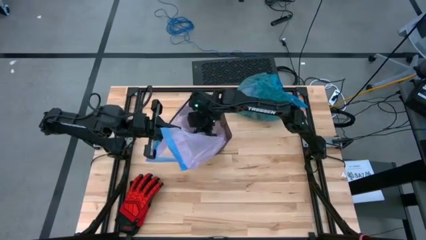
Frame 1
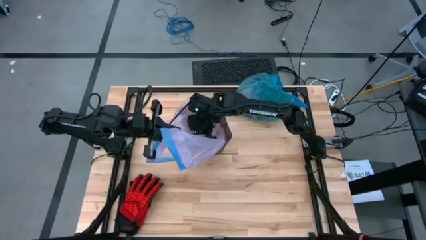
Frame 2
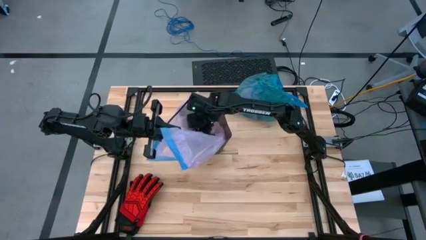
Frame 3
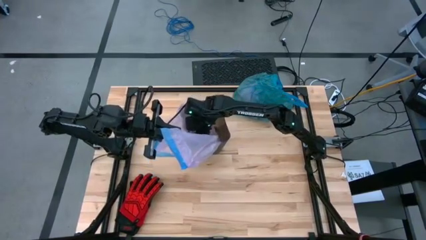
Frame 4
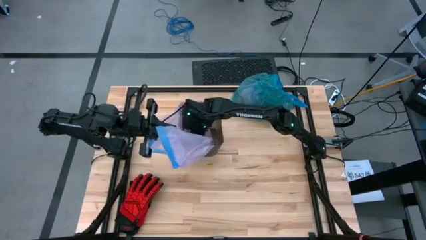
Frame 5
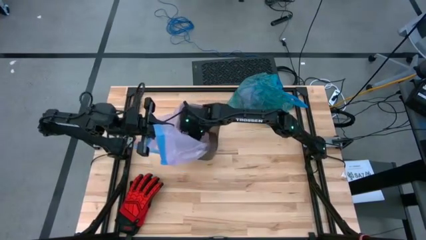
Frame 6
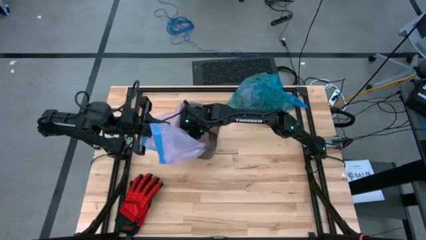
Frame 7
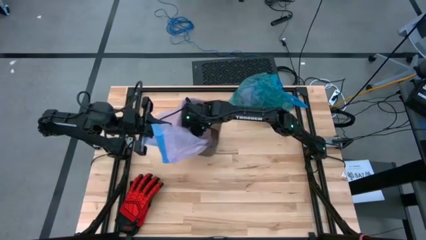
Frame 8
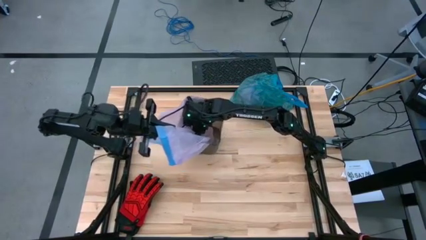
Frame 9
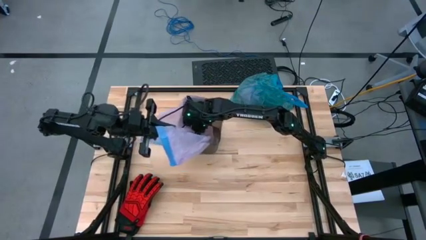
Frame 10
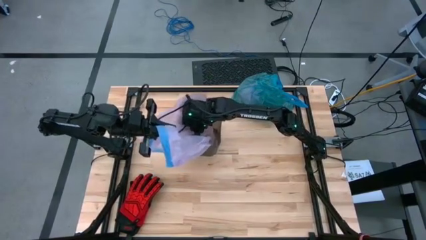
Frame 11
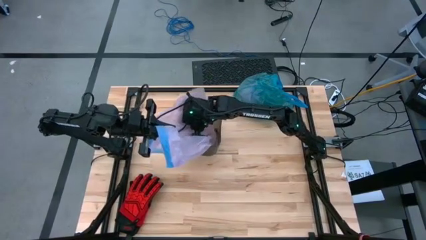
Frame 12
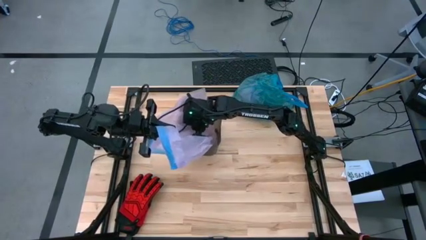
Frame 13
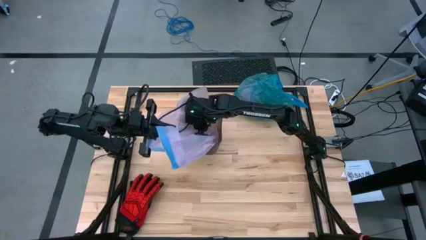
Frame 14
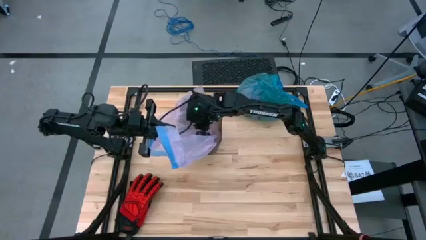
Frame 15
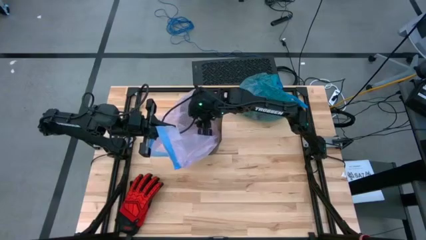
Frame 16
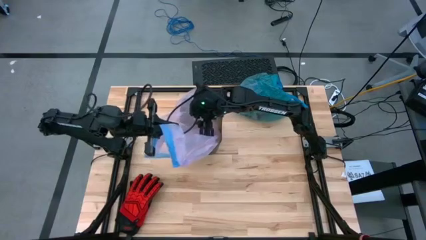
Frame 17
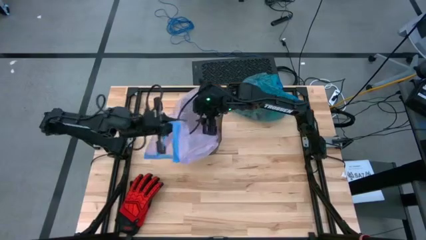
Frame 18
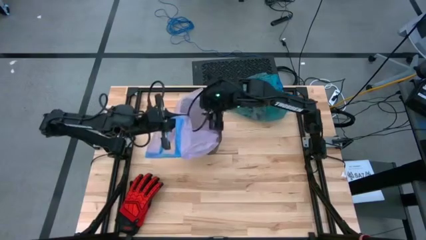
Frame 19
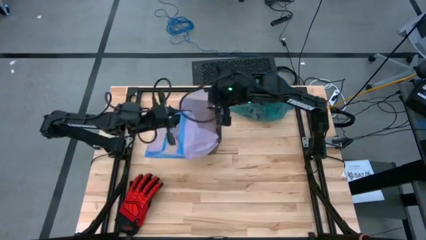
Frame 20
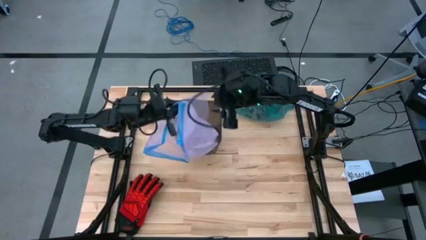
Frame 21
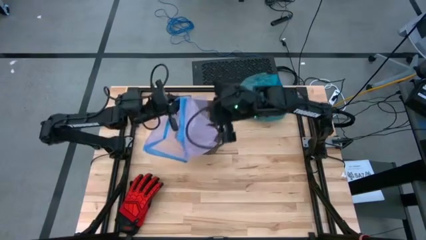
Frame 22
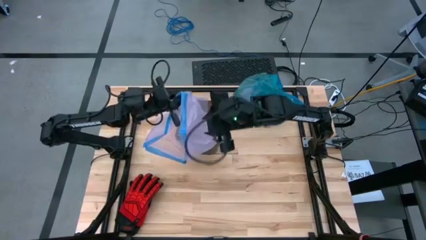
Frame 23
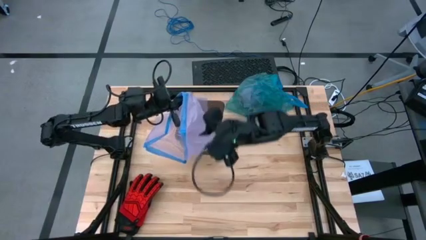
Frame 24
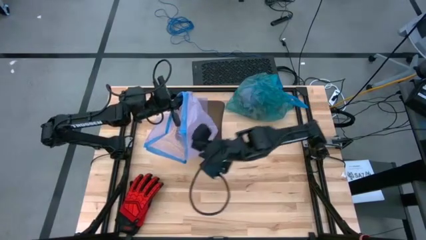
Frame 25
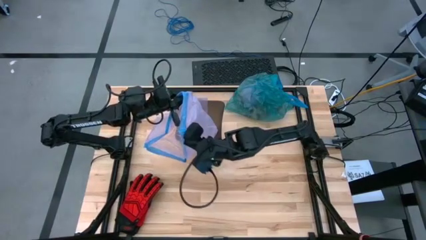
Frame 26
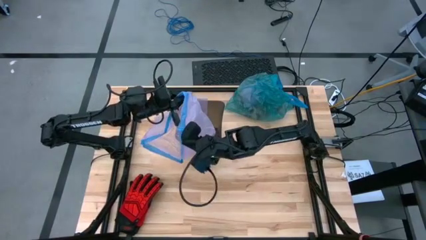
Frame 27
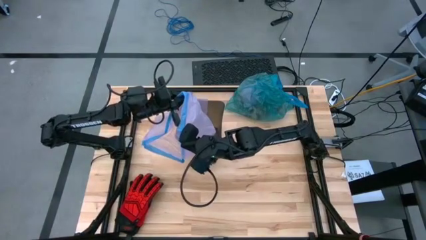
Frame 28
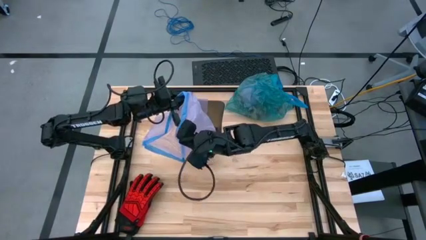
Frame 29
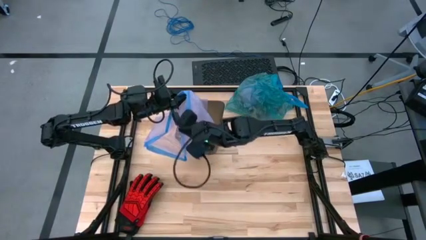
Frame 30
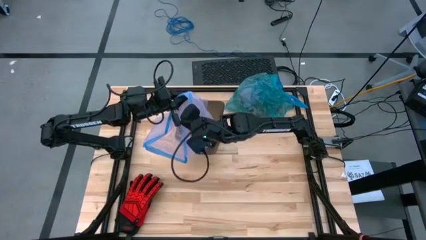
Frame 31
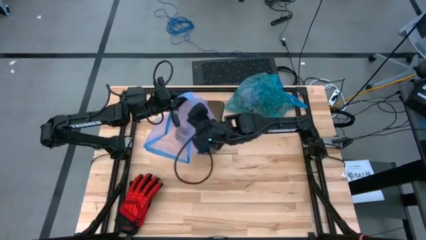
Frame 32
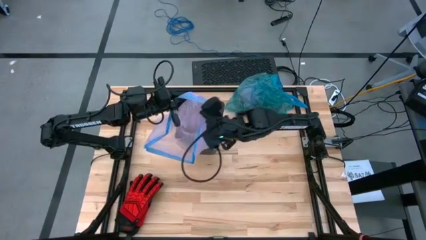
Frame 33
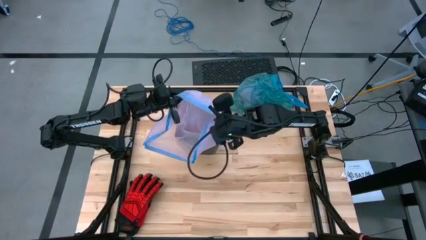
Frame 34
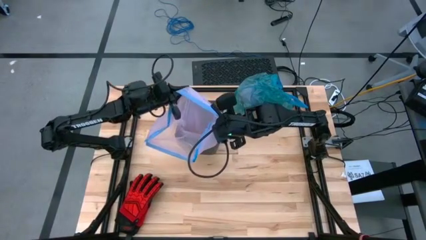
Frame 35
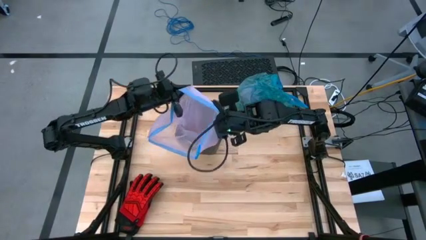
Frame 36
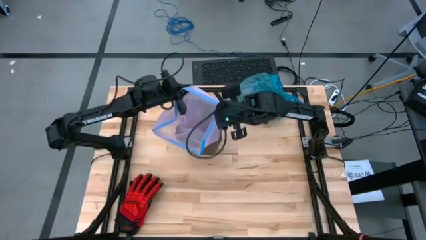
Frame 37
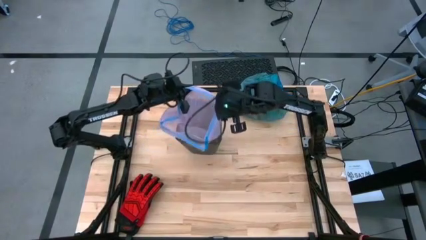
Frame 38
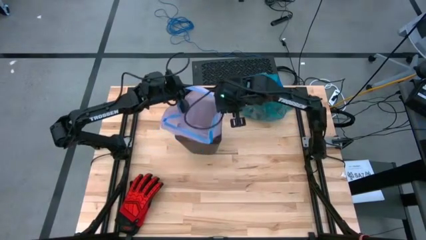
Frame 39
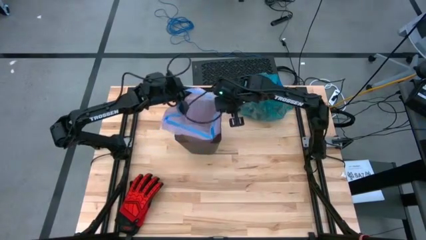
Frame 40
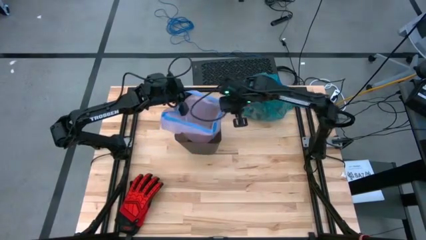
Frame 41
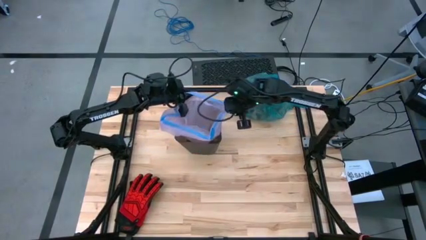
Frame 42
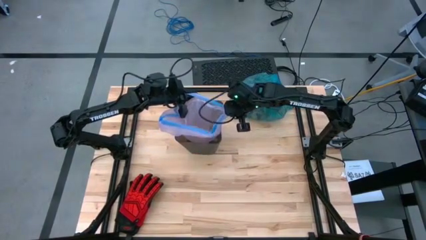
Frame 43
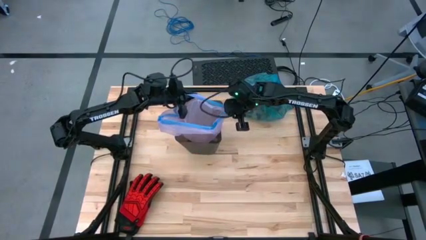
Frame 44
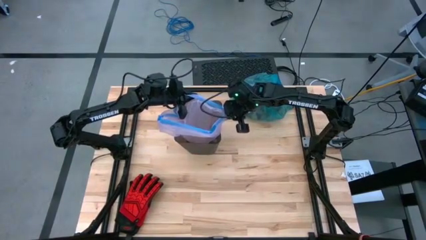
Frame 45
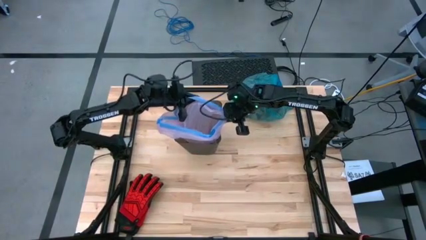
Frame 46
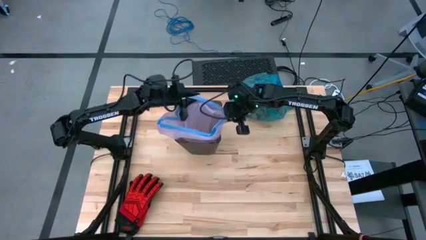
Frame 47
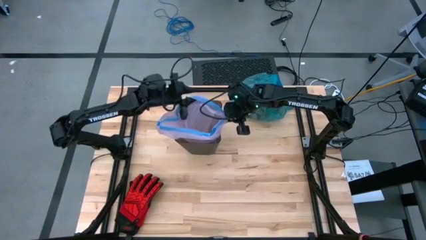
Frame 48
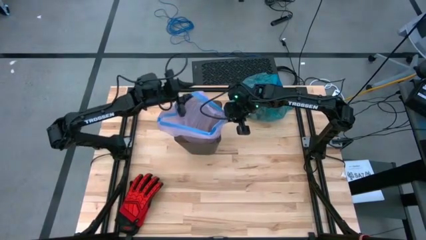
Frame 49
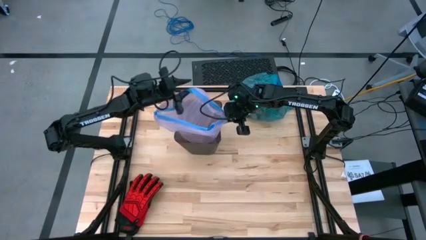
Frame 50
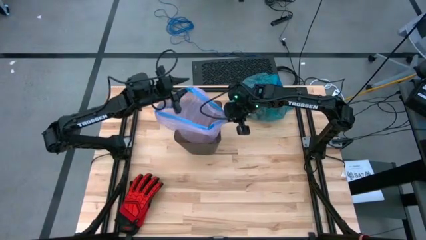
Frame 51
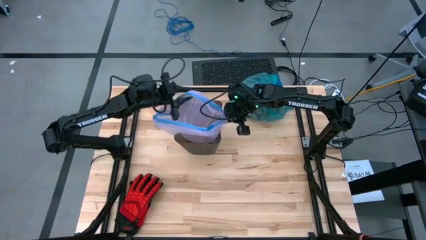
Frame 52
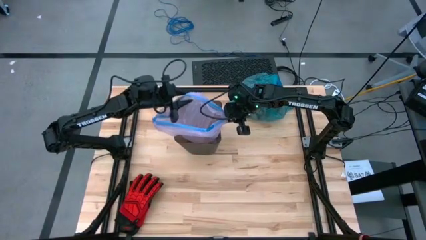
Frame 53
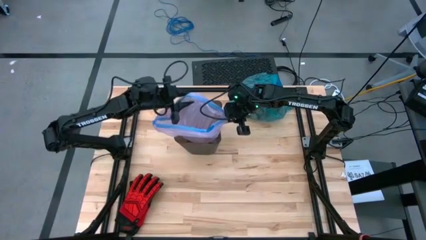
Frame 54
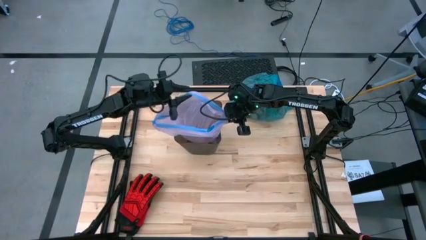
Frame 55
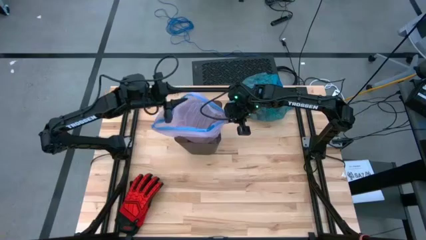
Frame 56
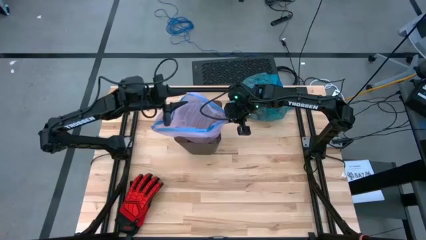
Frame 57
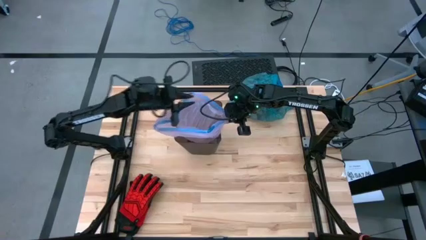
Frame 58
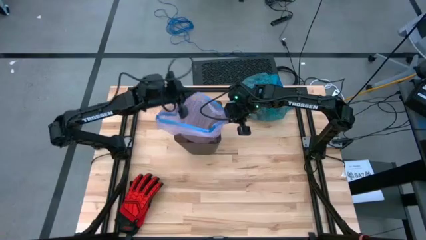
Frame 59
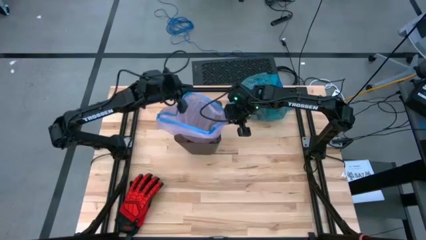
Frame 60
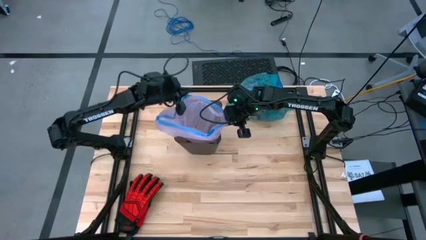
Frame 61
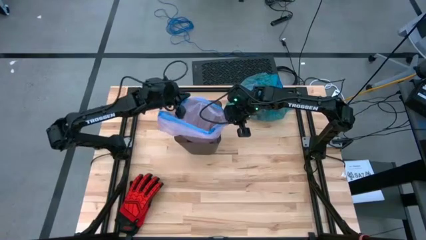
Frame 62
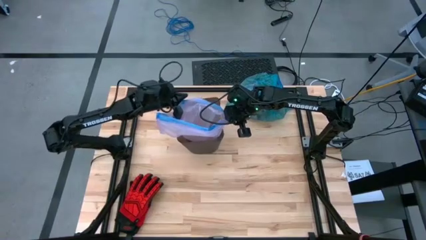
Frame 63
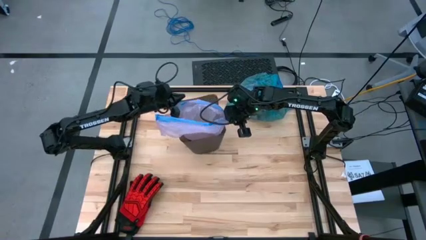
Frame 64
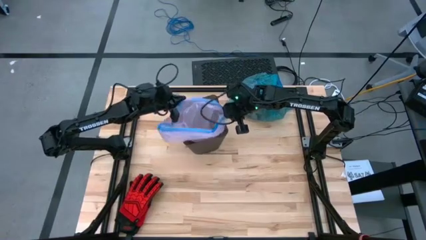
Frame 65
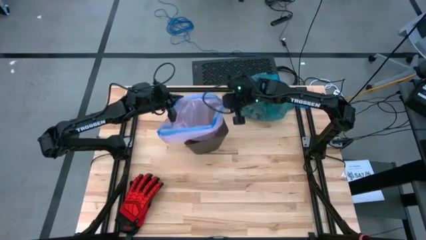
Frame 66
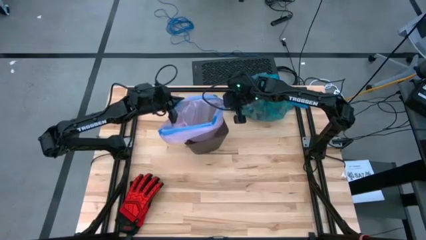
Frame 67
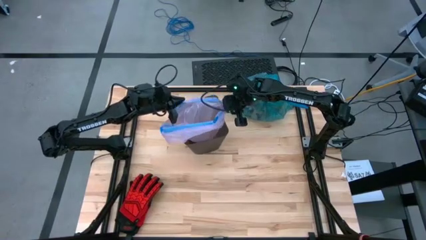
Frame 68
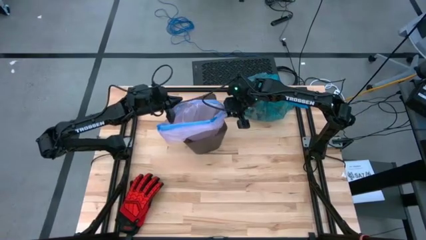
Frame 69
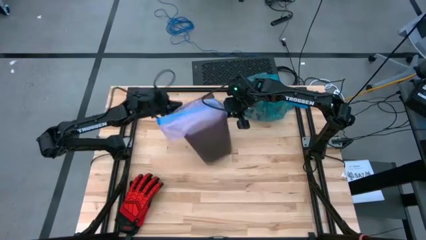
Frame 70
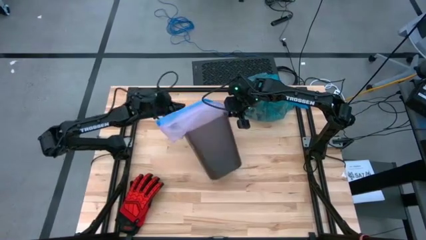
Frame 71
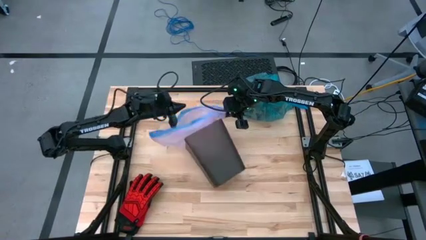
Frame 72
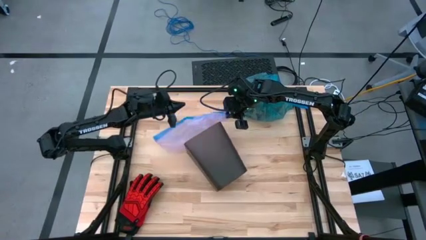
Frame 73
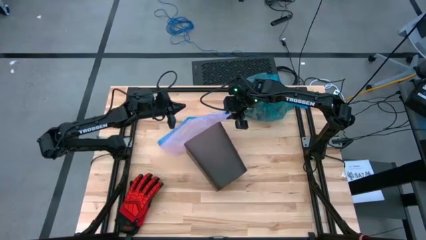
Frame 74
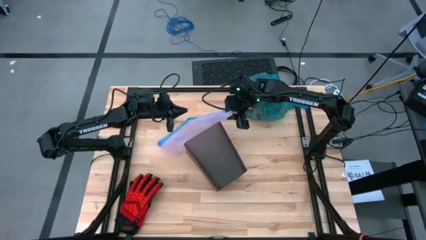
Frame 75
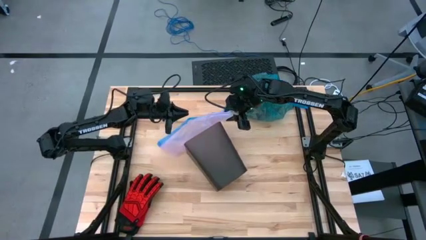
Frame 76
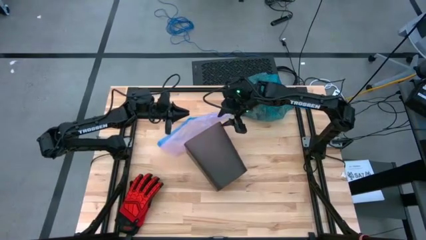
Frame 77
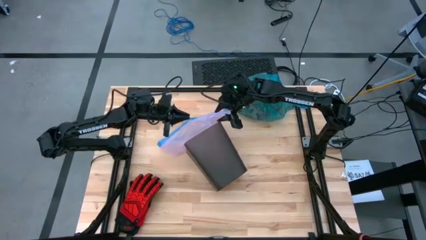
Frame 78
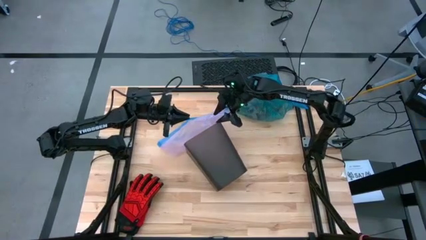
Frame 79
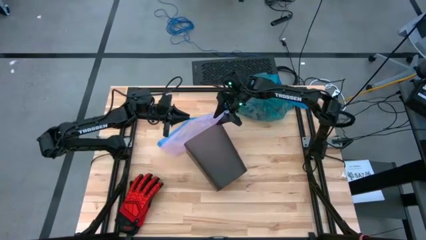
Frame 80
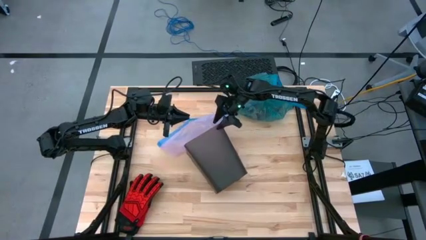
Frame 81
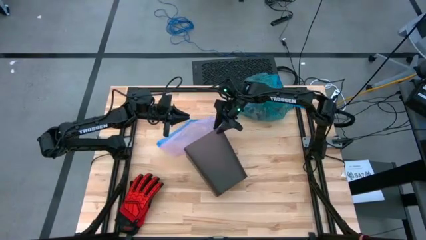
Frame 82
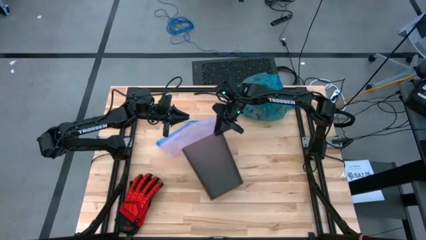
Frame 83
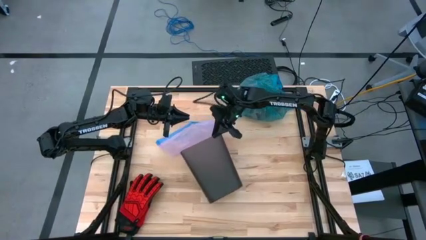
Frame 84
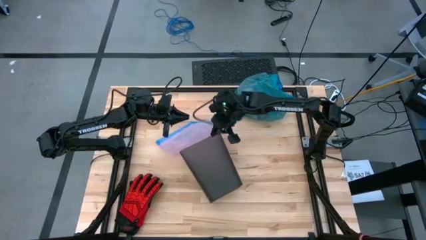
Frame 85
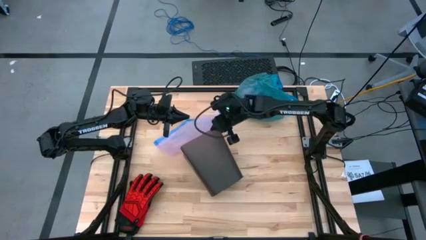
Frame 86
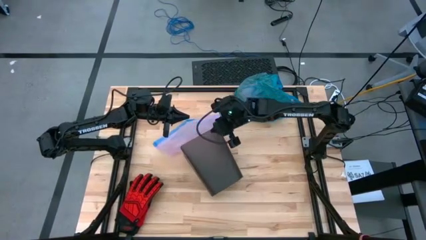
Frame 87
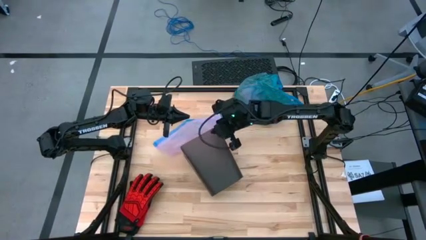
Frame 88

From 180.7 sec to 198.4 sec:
Task: place trash/remove bag and relplace
Put the pink trash bag into the trash bin
